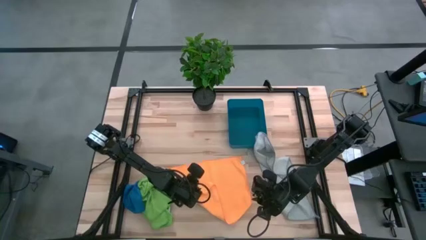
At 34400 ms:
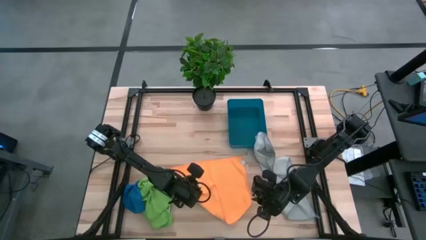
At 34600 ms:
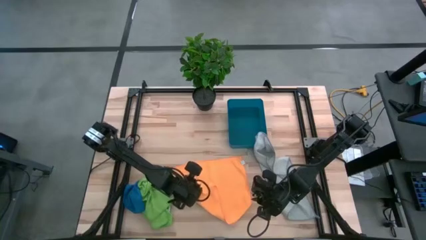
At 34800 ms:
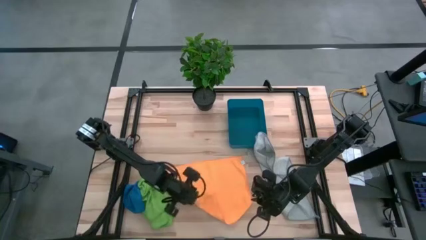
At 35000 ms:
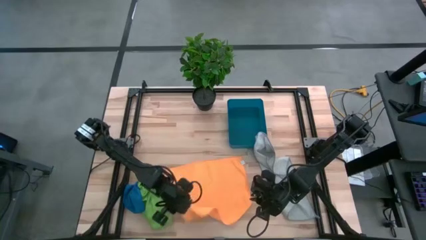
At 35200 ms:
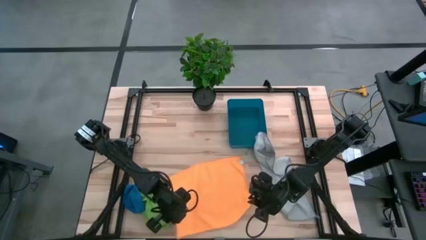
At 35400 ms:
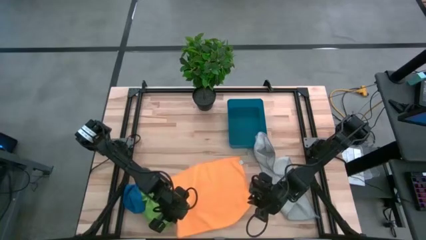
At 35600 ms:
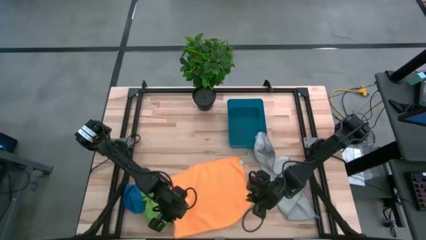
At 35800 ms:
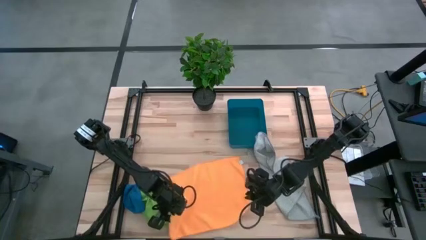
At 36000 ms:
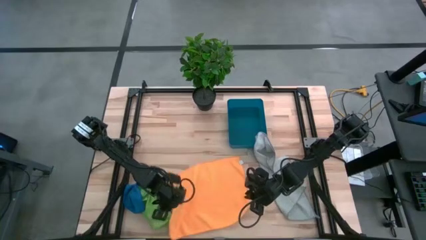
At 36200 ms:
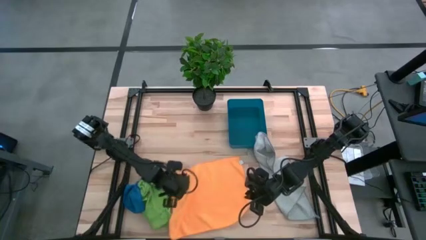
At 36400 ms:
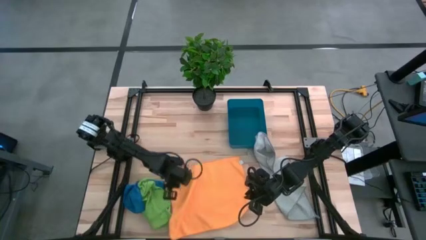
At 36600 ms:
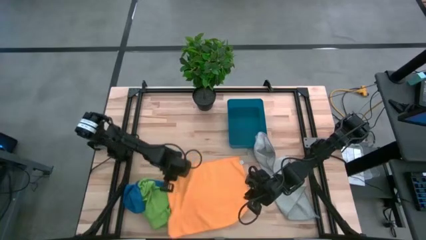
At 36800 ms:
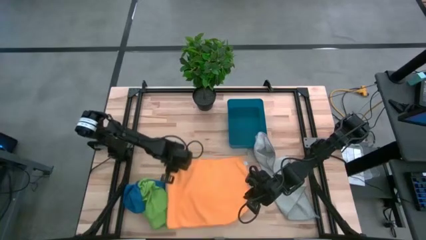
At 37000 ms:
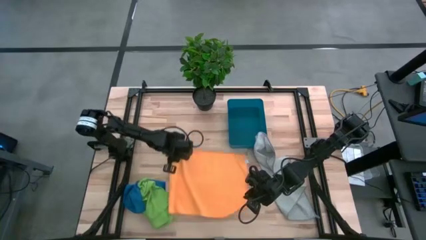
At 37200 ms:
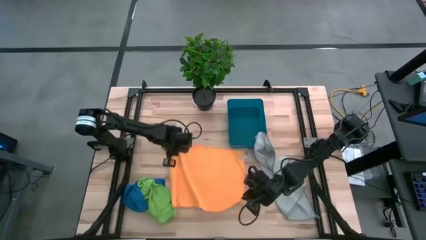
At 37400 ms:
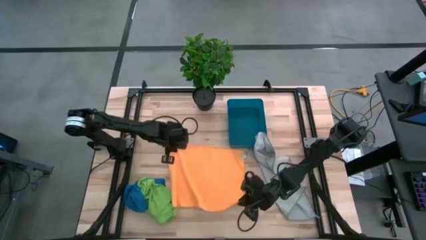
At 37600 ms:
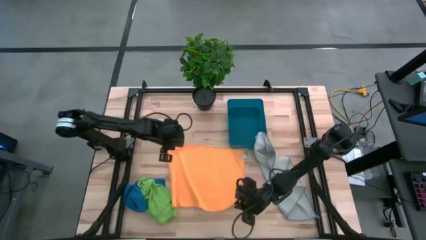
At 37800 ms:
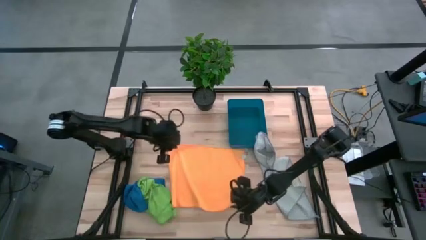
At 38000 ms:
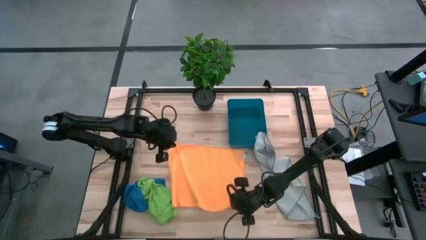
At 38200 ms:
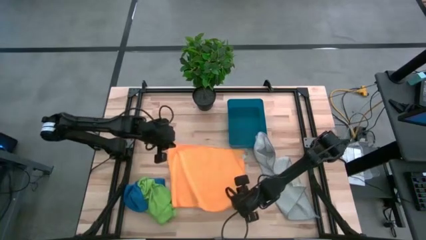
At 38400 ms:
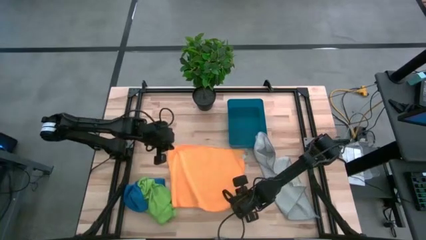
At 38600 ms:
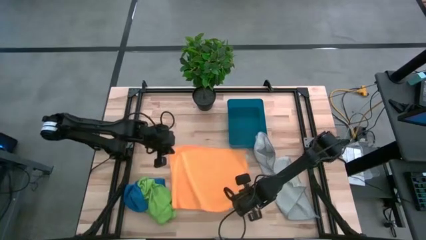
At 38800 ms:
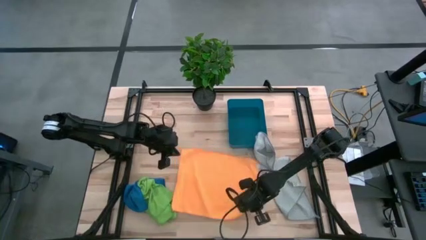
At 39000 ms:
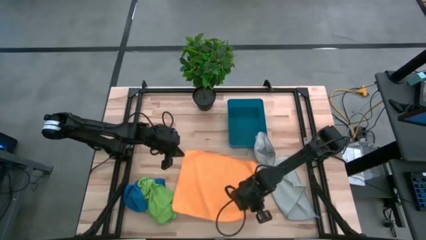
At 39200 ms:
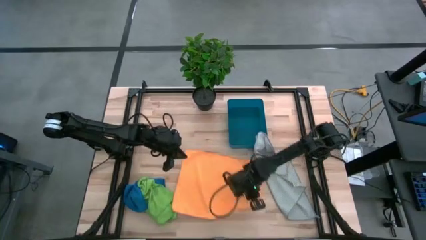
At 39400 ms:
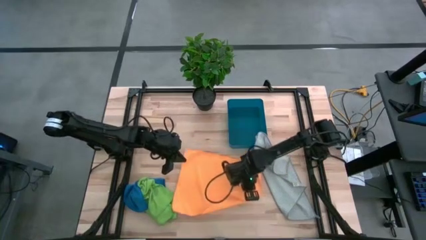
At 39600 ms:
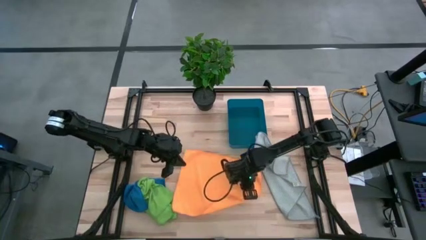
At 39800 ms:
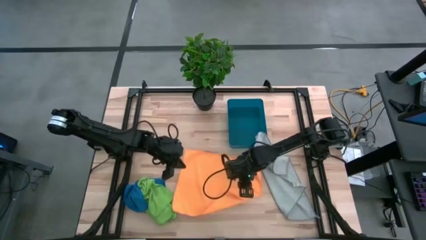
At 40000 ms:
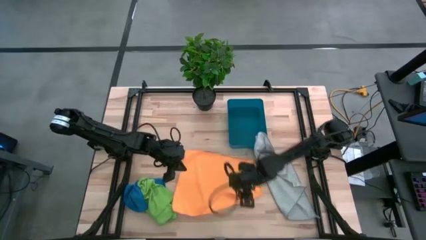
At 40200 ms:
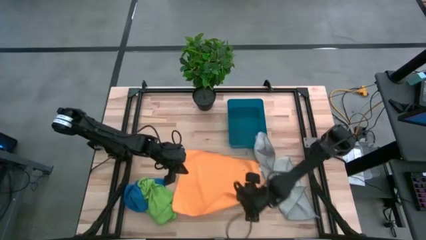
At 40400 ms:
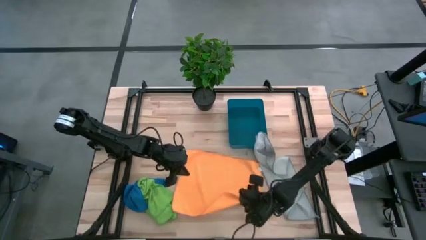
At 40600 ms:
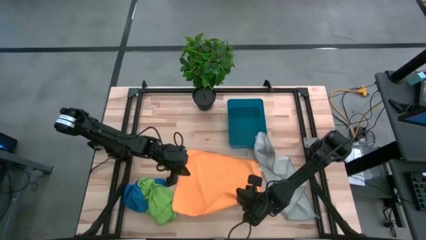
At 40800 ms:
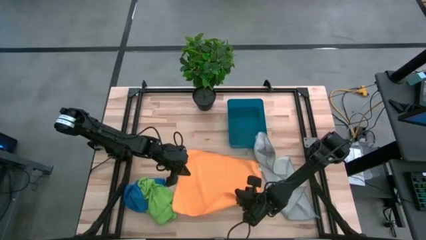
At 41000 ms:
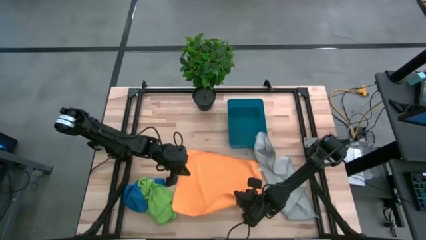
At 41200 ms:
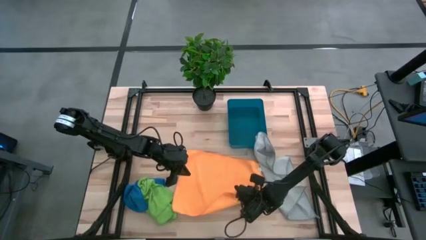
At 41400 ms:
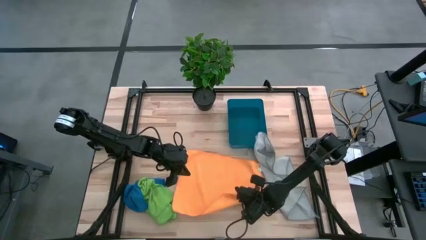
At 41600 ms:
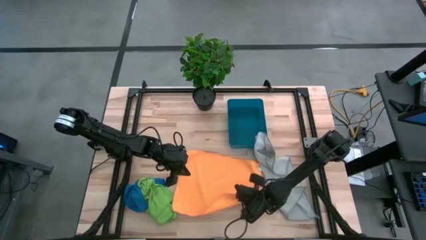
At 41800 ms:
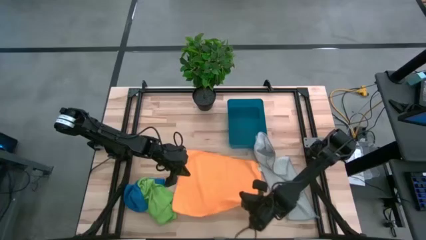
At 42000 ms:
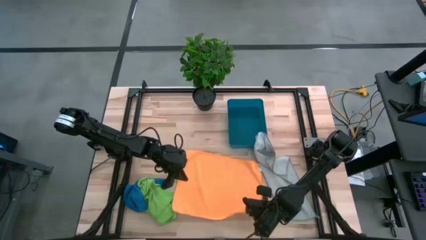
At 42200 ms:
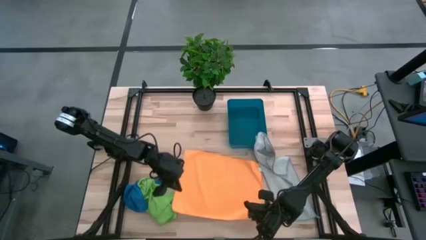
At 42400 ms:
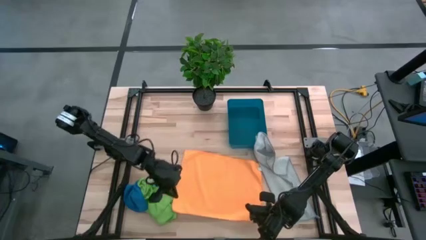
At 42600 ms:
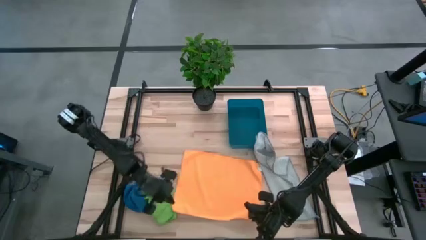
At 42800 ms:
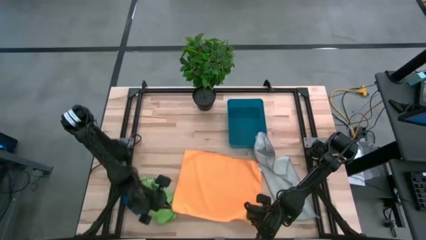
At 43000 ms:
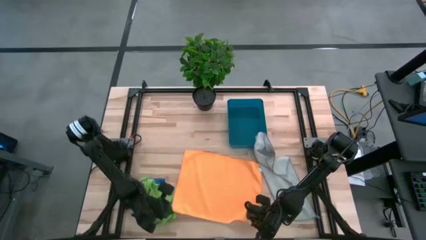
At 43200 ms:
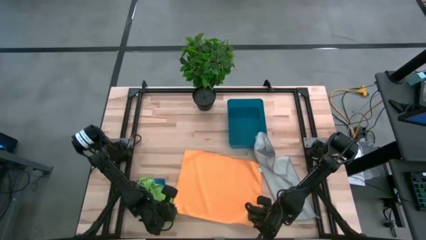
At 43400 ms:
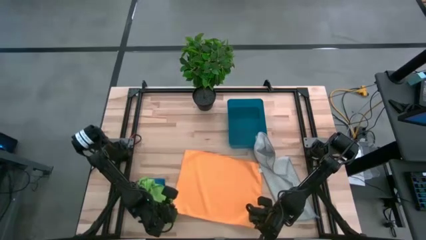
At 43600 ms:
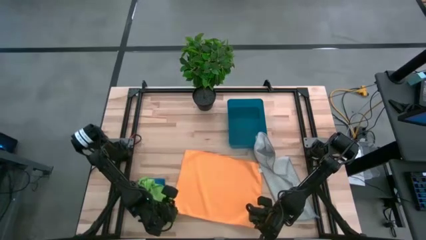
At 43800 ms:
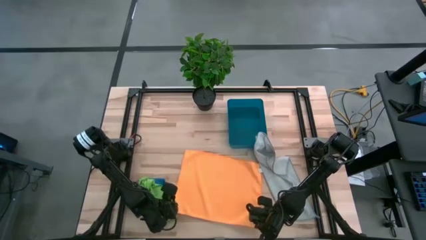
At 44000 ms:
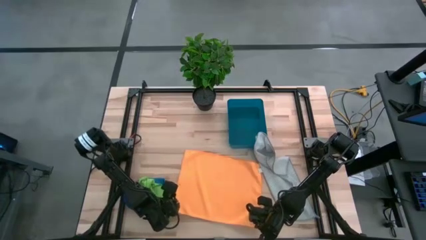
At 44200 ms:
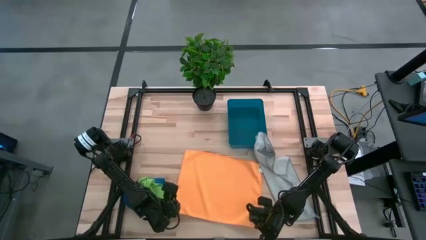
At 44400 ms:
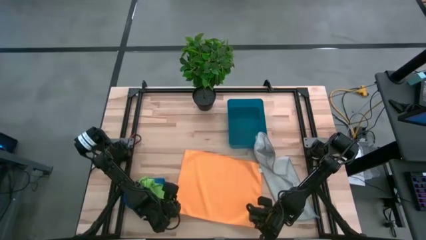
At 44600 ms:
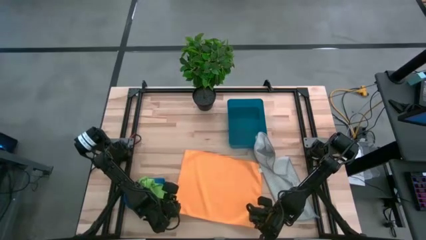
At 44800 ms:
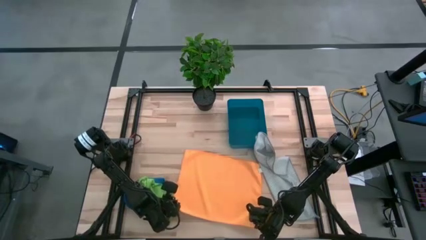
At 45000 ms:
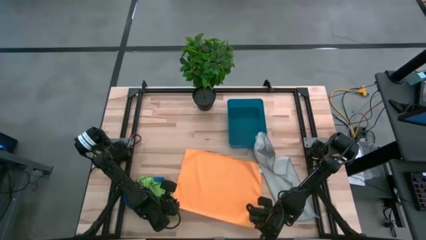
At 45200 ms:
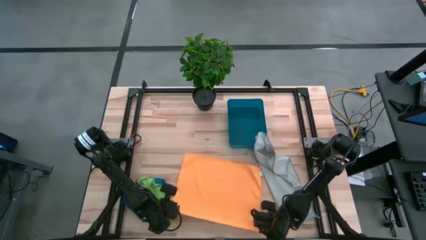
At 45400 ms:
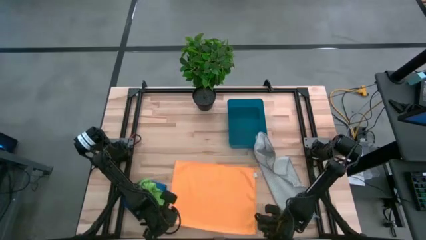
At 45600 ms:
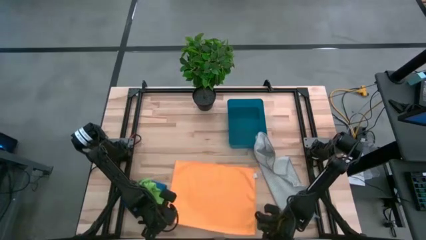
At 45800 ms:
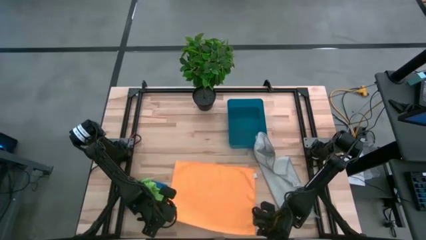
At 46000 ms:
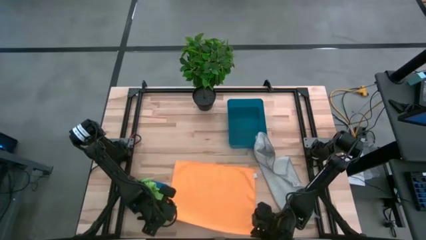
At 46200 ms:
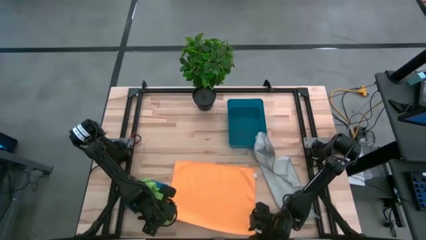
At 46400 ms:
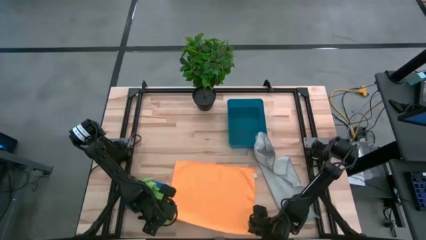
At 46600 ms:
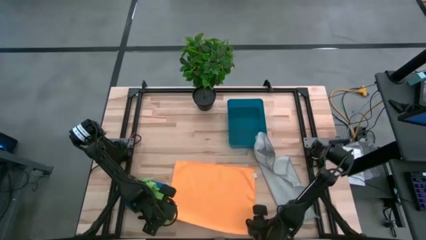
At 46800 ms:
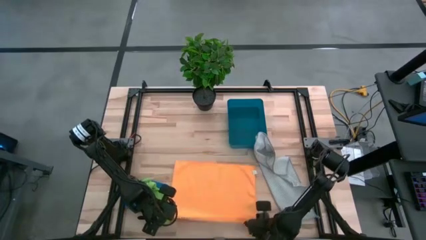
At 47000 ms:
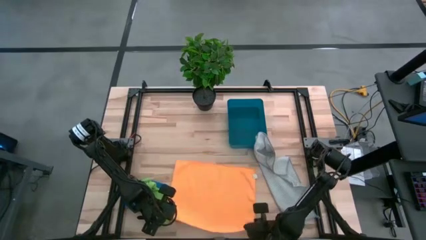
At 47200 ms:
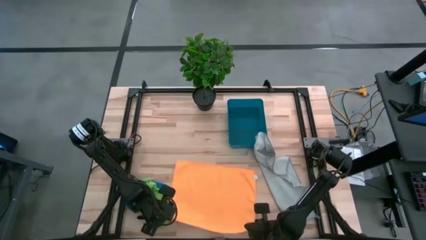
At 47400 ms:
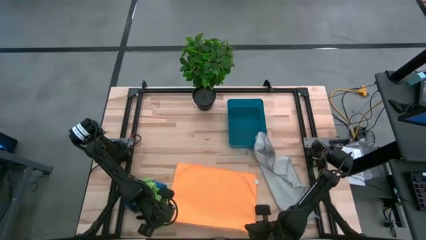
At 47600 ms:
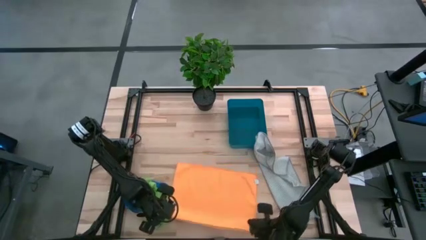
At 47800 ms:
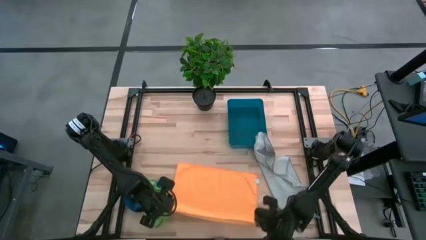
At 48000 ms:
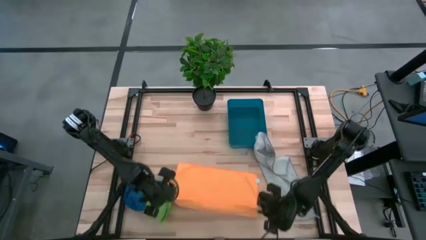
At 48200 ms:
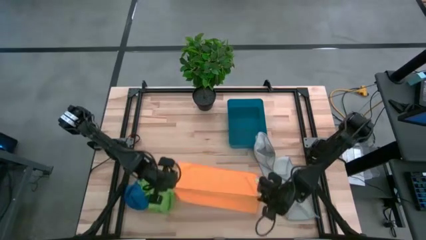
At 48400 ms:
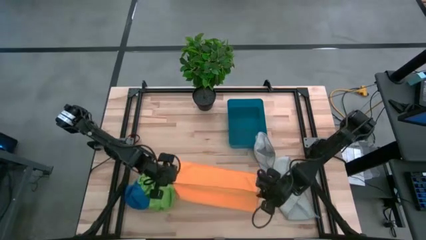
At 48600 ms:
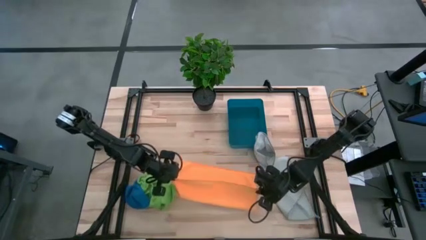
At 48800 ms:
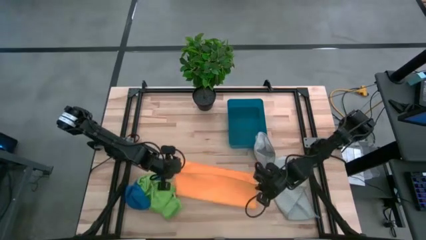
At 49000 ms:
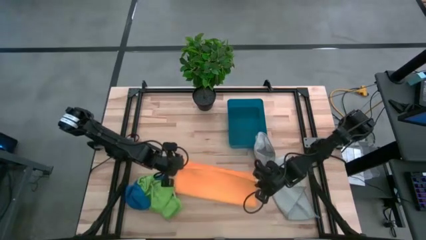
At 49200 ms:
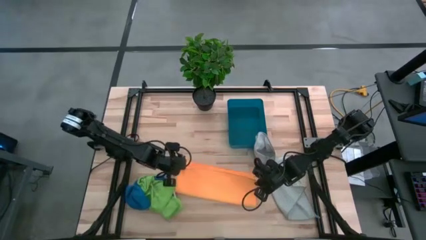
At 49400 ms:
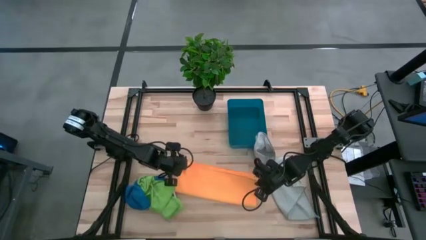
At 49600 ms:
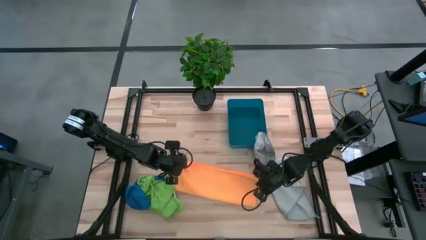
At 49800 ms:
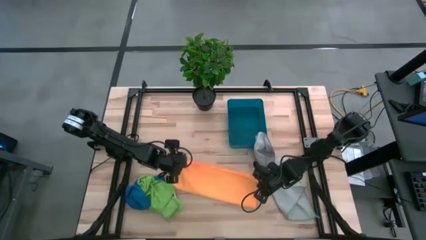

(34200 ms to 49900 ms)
Task: Fold microfiber towels
Fold the orange microfiber towel
